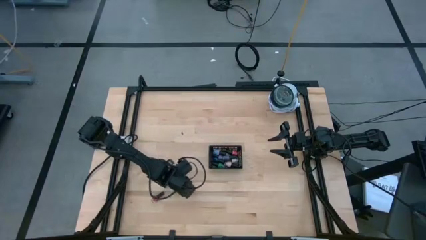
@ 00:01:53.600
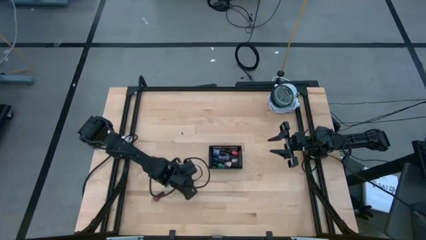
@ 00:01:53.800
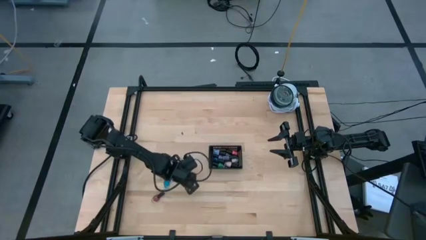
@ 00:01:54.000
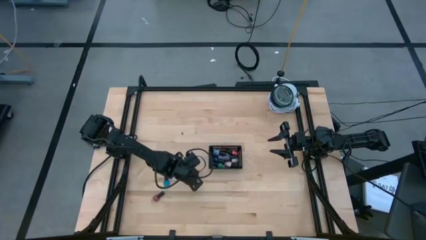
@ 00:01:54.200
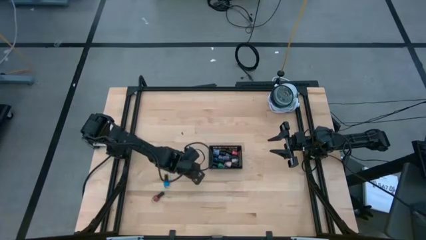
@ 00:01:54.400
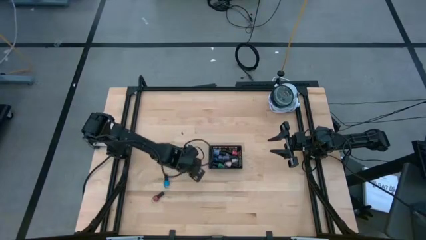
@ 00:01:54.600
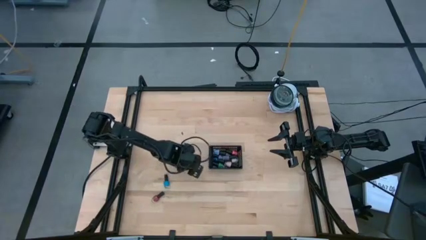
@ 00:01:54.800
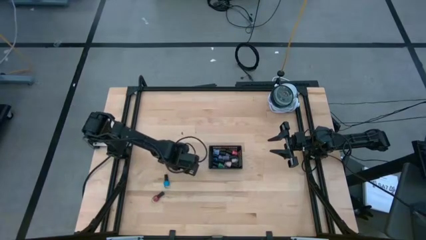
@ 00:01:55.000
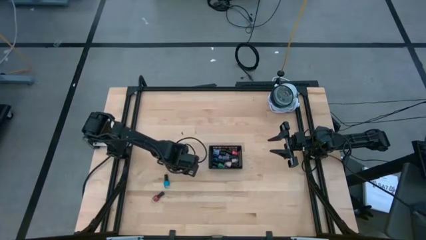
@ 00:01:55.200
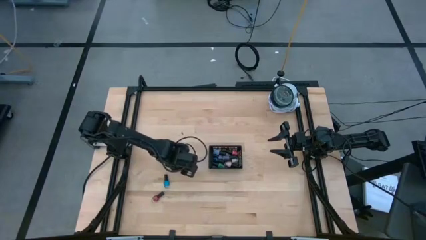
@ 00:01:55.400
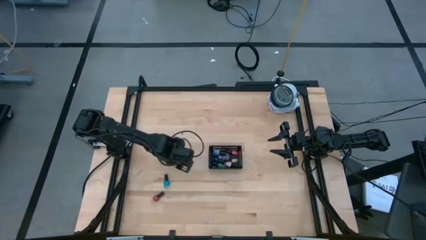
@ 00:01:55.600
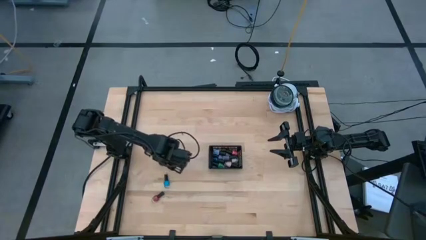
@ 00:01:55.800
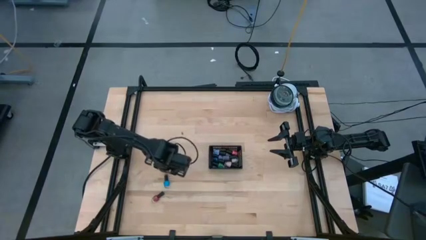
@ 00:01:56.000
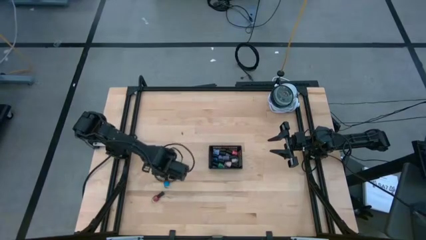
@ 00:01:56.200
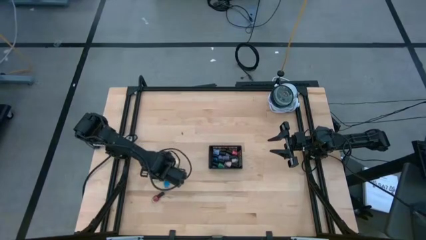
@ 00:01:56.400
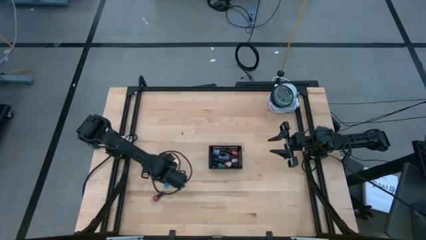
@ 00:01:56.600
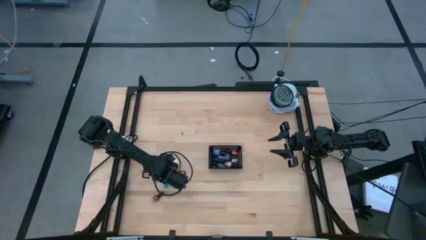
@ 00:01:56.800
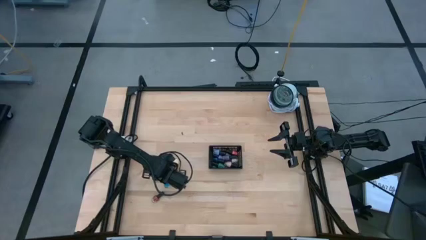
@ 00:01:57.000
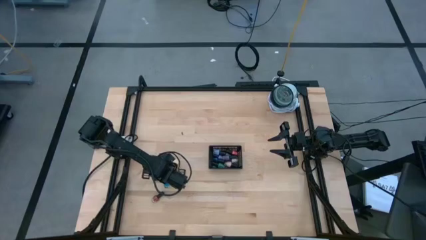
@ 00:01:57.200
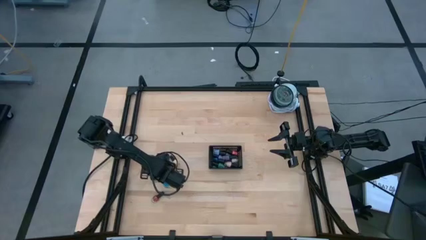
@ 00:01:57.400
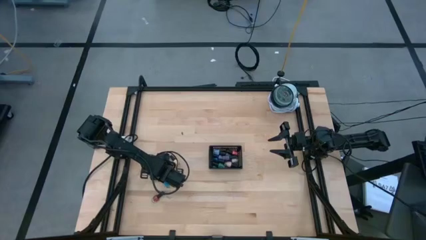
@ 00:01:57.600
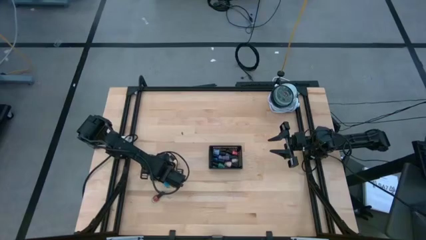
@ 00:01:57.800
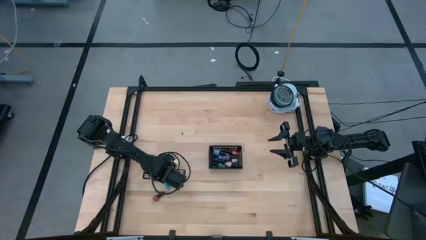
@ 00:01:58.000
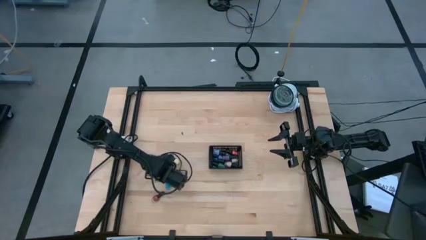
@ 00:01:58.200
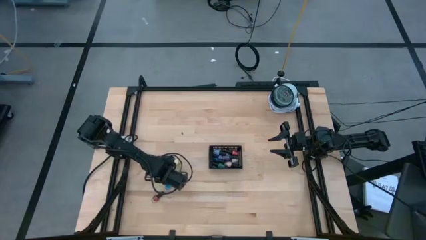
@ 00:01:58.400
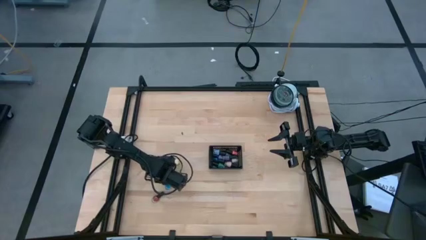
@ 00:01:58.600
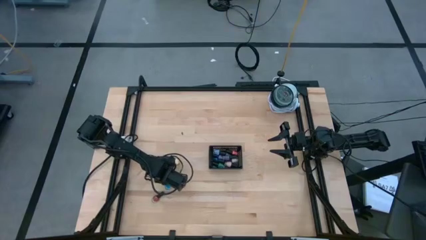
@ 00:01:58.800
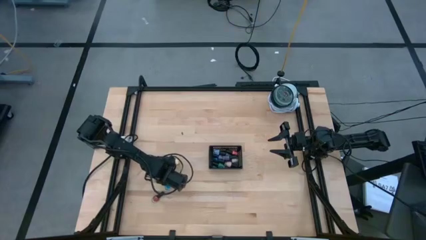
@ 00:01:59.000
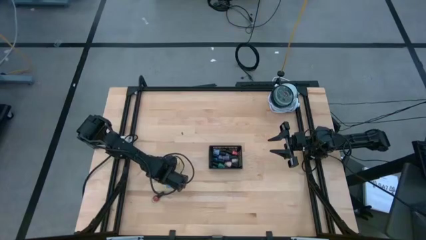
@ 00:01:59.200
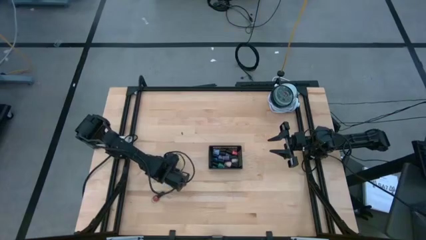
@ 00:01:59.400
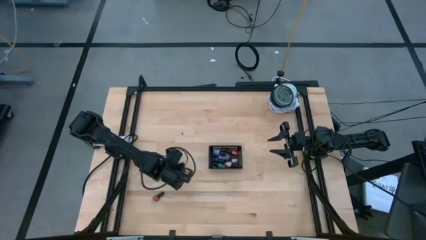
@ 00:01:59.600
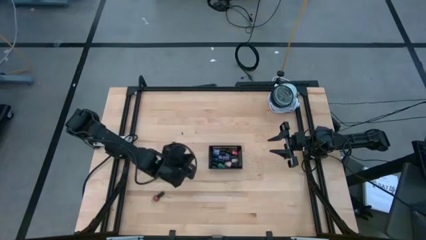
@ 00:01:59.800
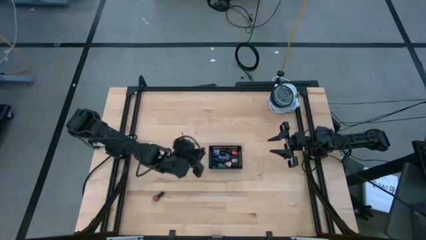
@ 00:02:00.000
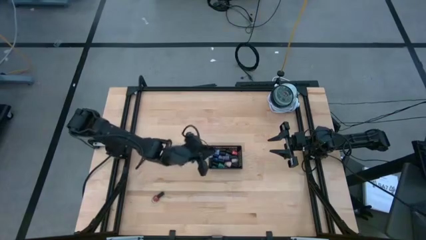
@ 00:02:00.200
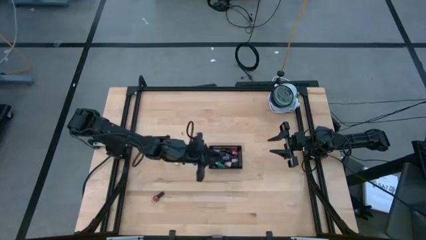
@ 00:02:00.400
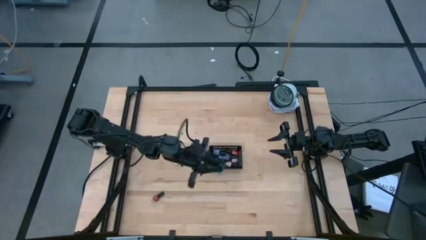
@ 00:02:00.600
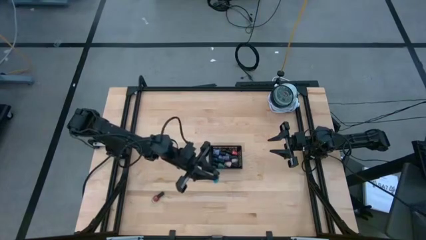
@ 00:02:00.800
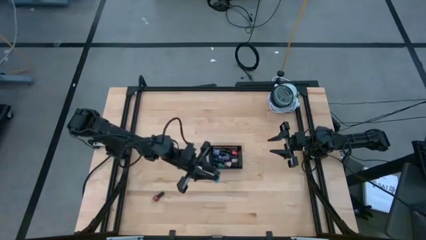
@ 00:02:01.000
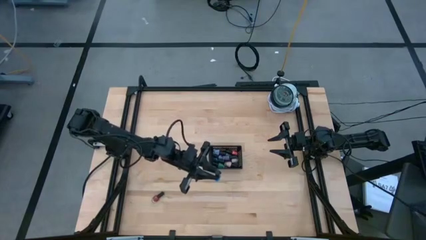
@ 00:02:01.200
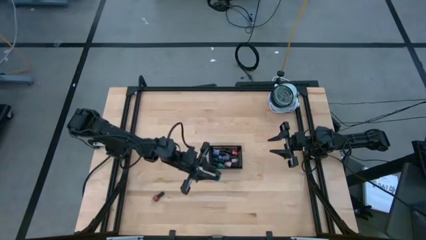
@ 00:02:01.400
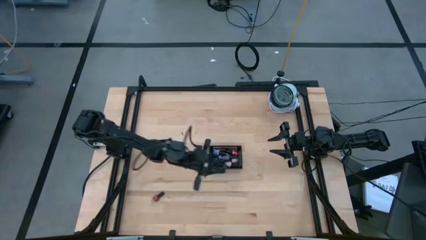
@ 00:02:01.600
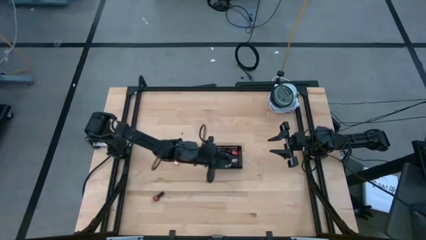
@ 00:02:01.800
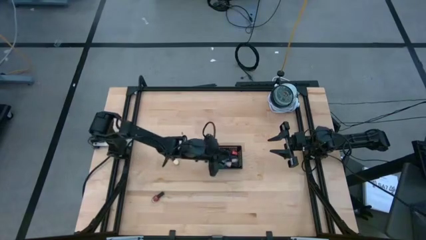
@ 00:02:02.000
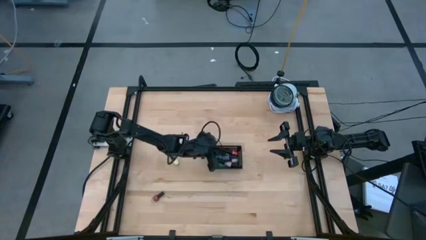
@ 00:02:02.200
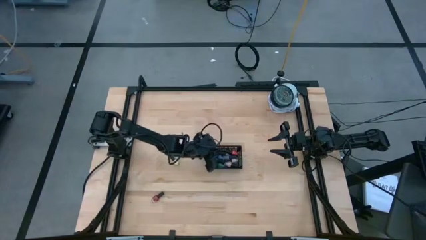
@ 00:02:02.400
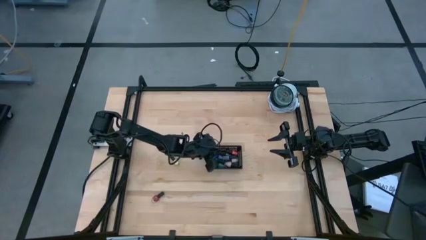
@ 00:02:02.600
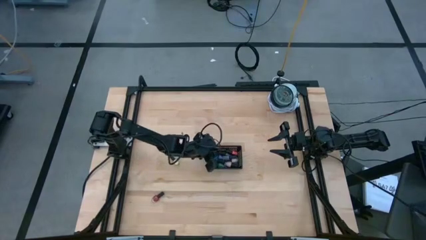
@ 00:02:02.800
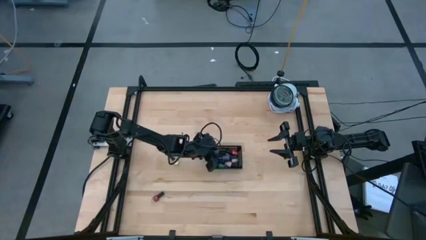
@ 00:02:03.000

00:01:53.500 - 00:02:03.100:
Task: Pick & Place Nail Polish
Put the blue nail polish into the black bin

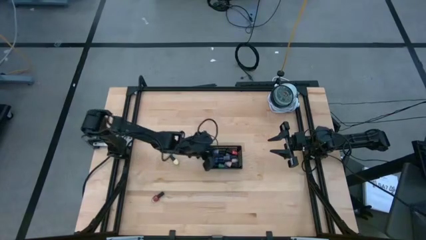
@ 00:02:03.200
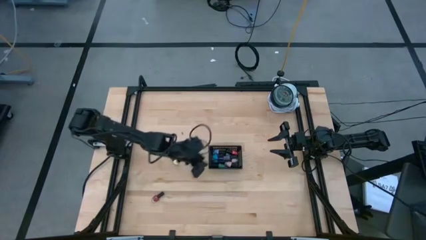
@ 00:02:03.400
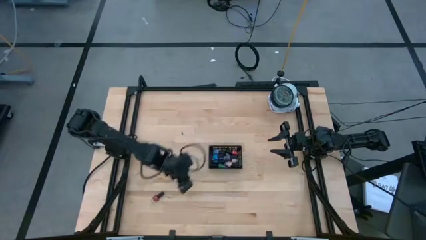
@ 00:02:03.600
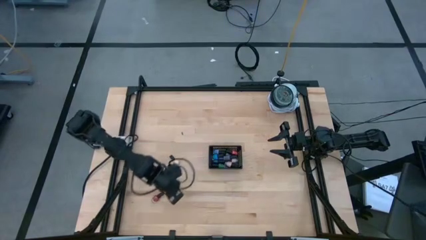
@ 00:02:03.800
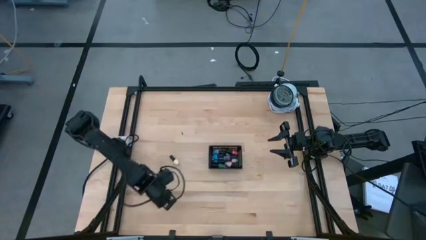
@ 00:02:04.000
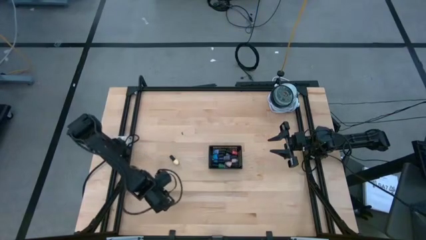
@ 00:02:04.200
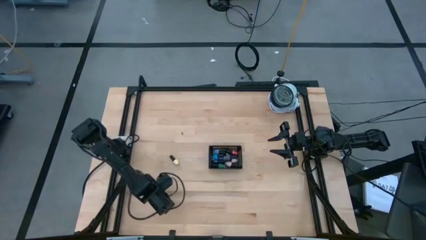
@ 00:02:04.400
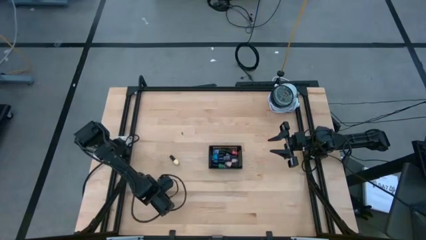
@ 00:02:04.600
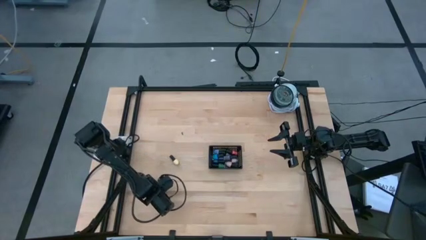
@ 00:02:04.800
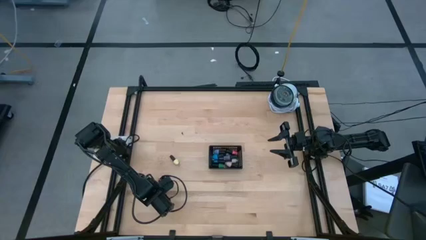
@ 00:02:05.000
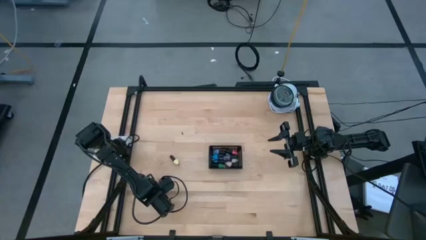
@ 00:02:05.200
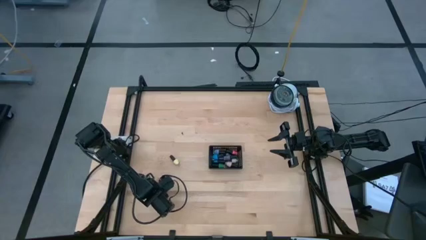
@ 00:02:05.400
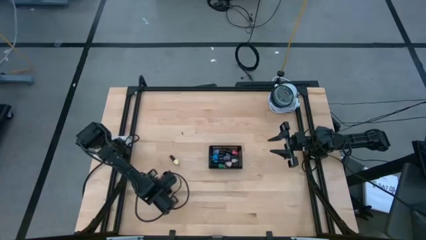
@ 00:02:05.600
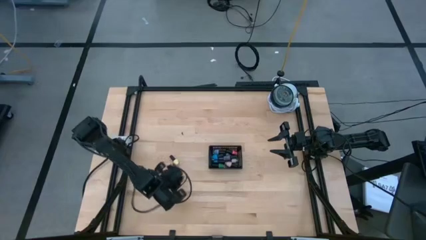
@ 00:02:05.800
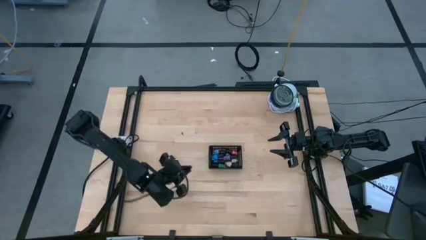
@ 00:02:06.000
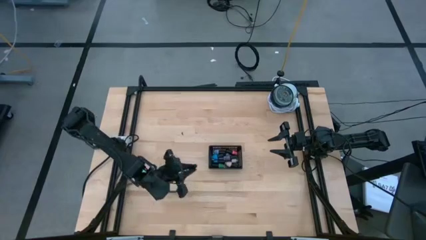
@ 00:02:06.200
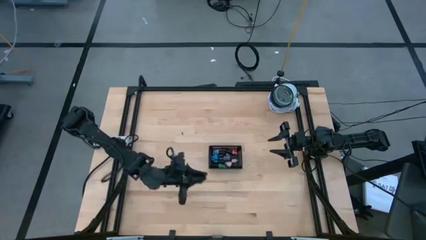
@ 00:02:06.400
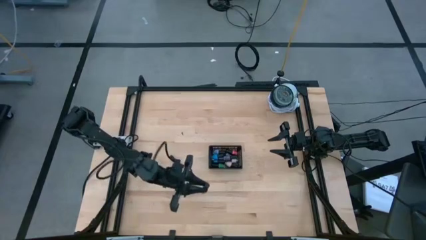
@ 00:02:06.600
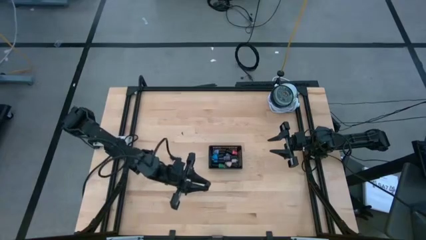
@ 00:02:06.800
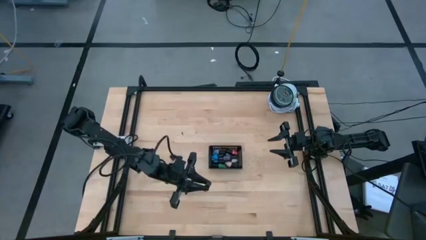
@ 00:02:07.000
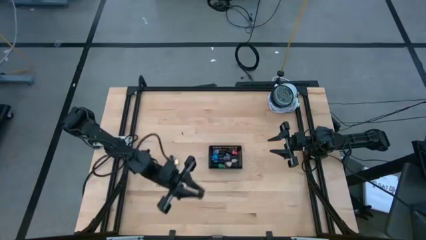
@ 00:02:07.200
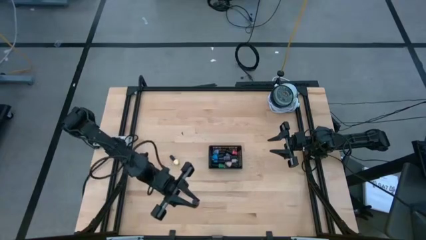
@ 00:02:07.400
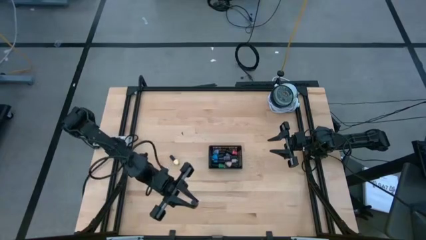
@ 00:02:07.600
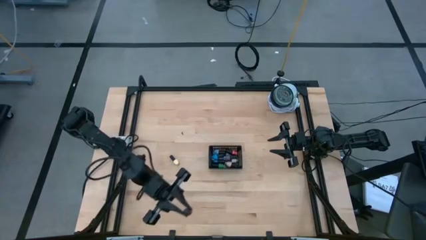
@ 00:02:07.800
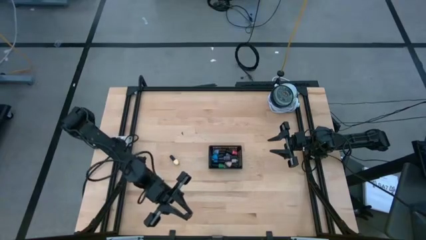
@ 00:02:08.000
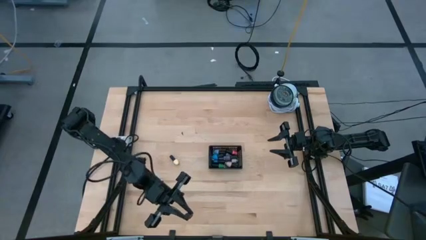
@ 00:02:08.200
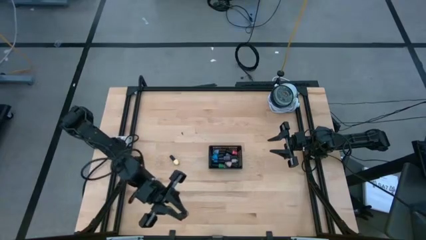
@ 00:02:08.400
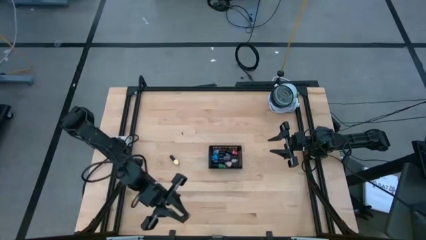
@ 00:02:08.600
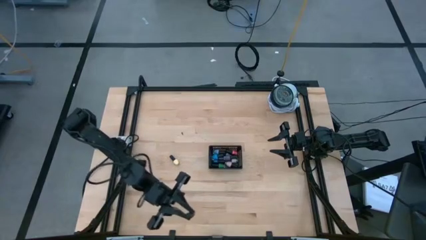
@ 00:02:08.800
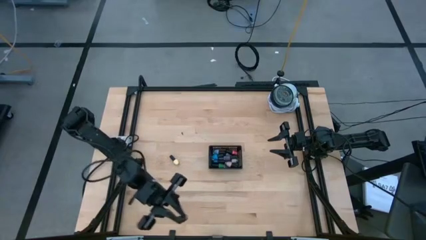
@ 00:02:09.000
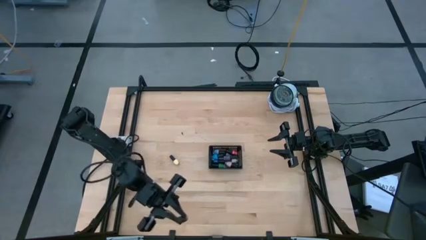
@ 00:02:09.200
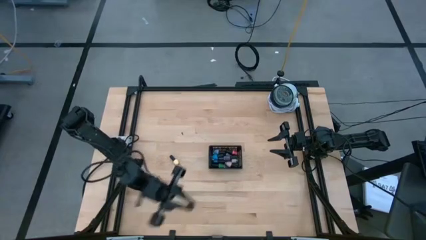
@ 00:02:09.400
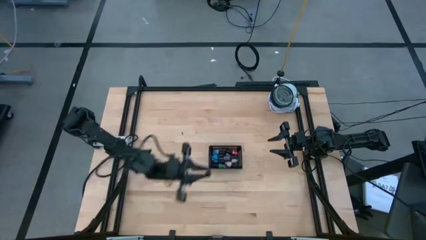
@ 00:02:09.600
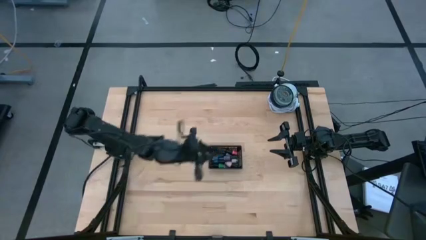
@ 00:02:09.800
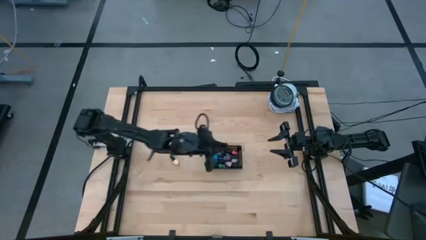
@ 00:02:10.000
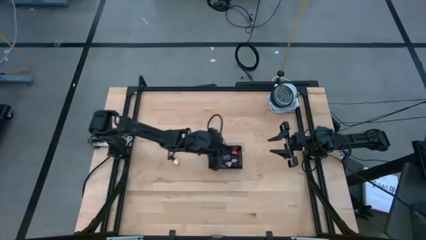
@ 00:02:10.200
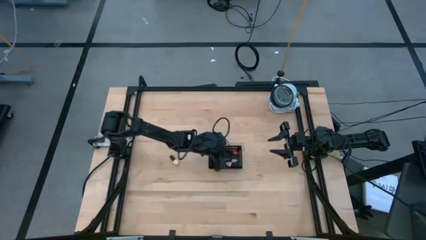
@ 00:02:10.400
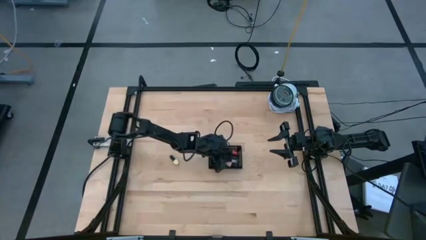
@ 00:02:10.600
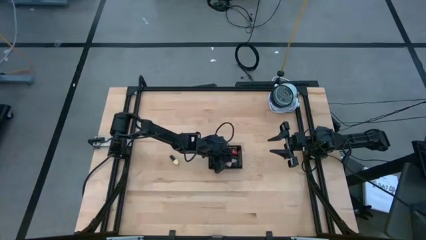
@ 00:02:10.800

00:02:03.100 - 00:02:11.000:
Put the red nail polish into the black bin
